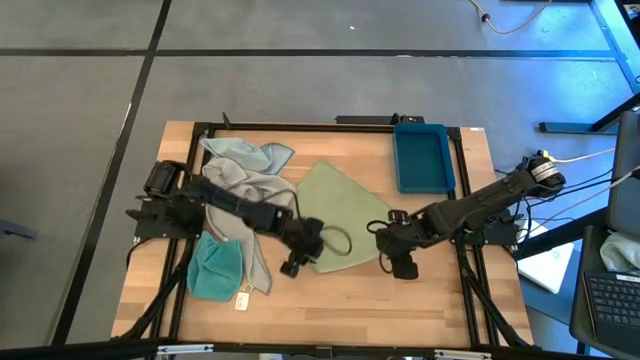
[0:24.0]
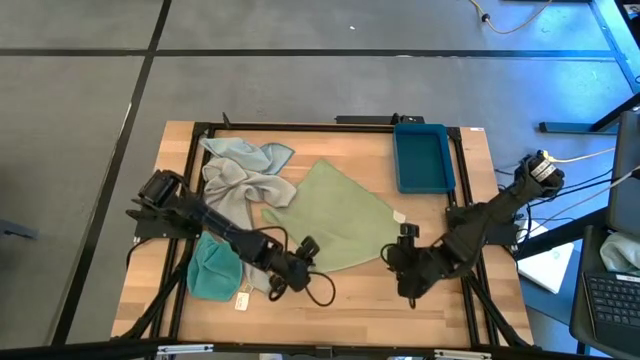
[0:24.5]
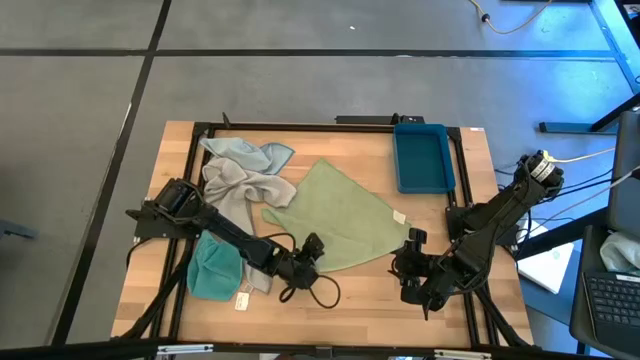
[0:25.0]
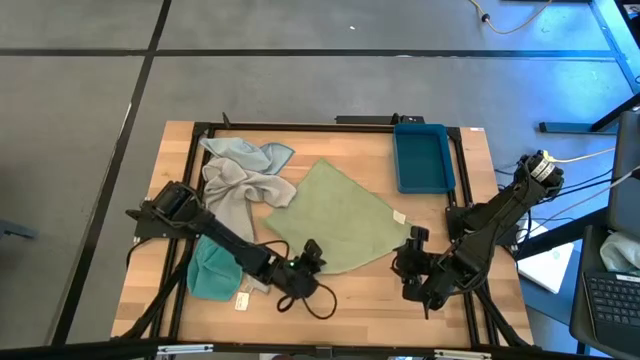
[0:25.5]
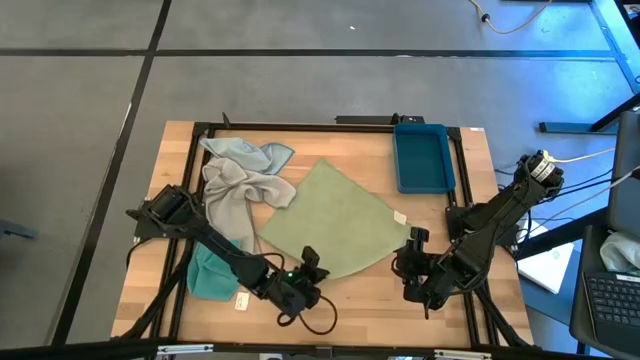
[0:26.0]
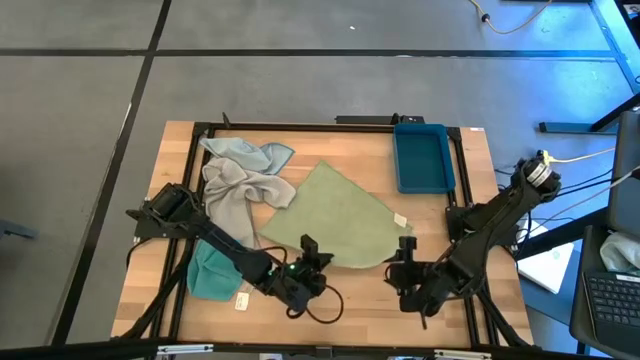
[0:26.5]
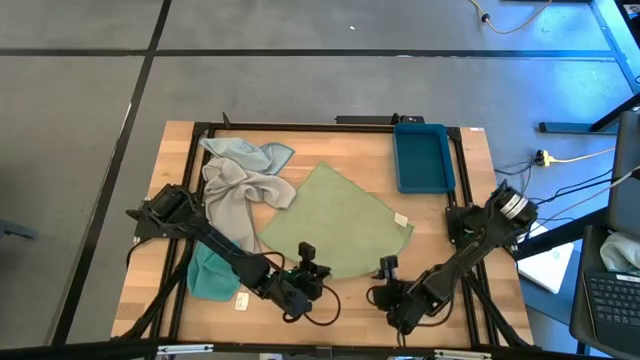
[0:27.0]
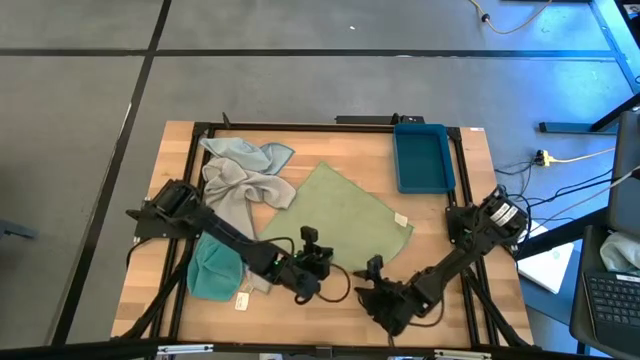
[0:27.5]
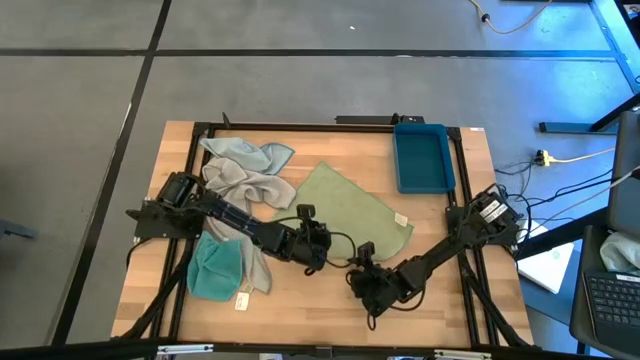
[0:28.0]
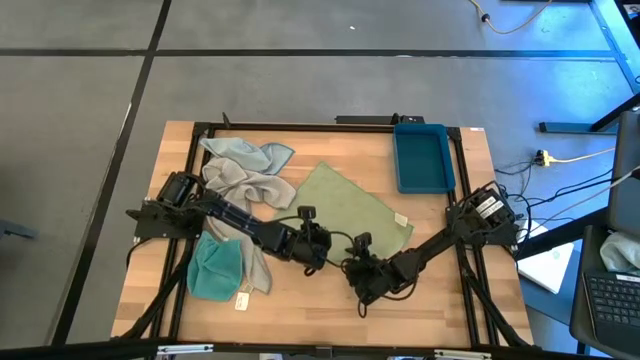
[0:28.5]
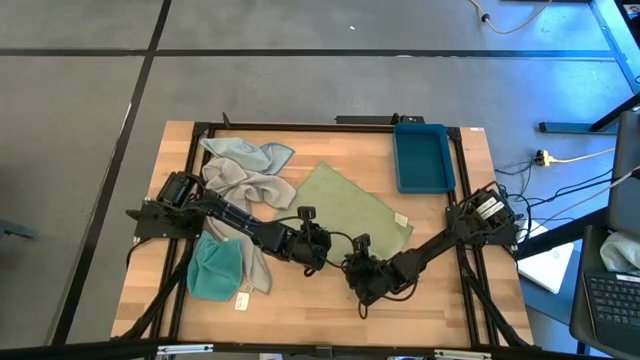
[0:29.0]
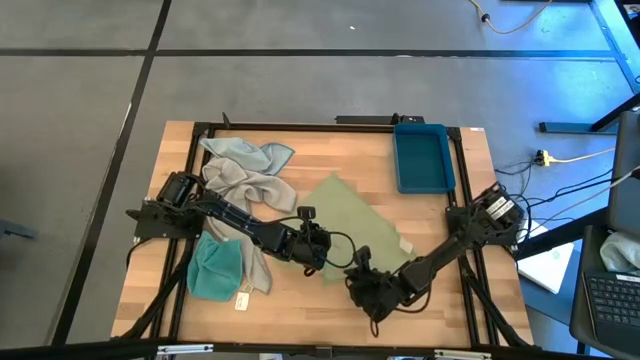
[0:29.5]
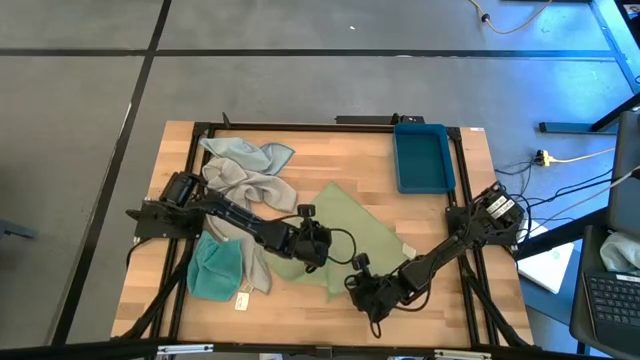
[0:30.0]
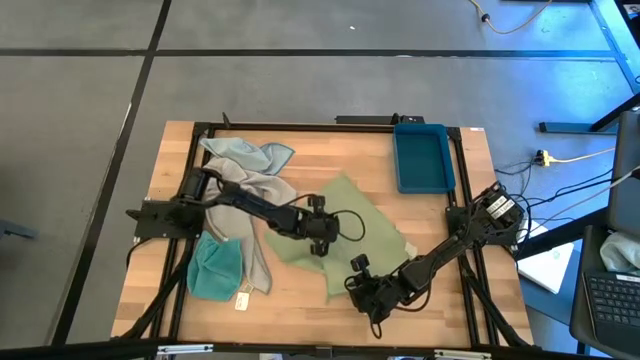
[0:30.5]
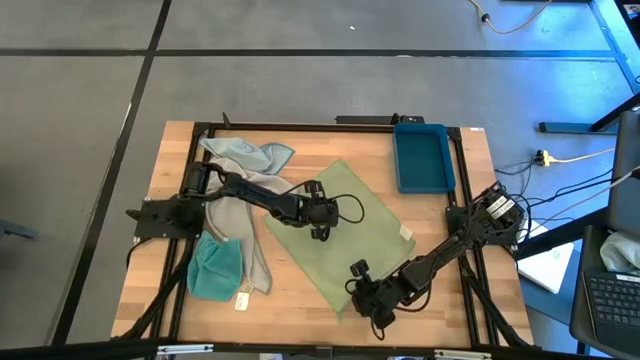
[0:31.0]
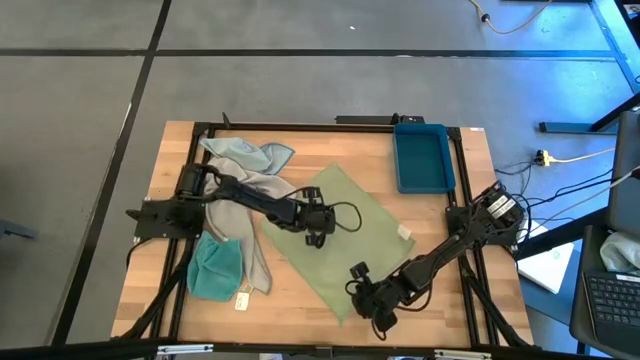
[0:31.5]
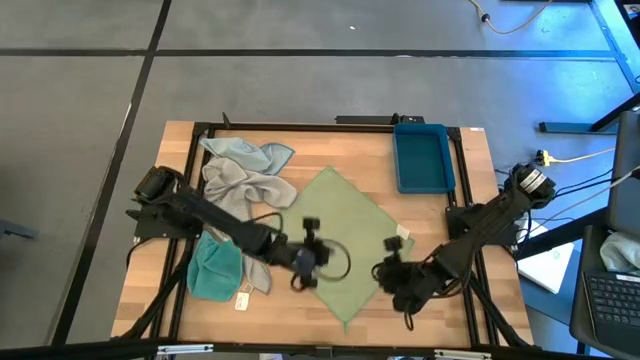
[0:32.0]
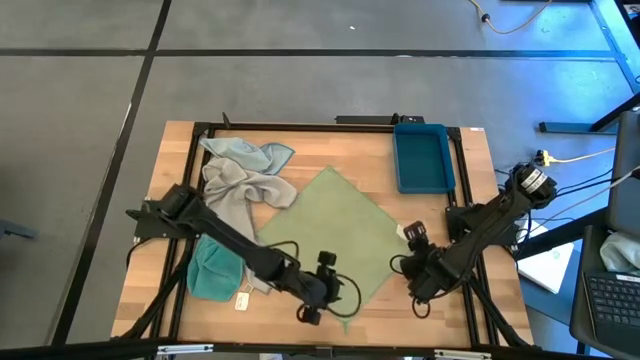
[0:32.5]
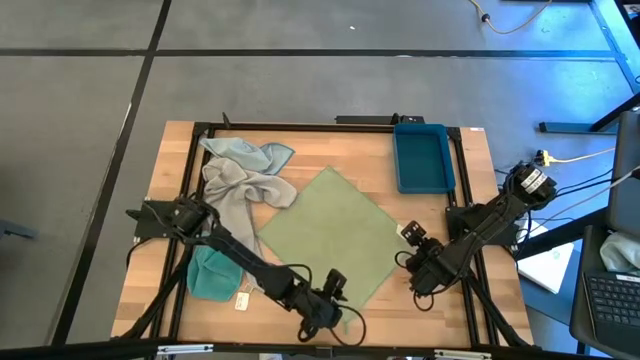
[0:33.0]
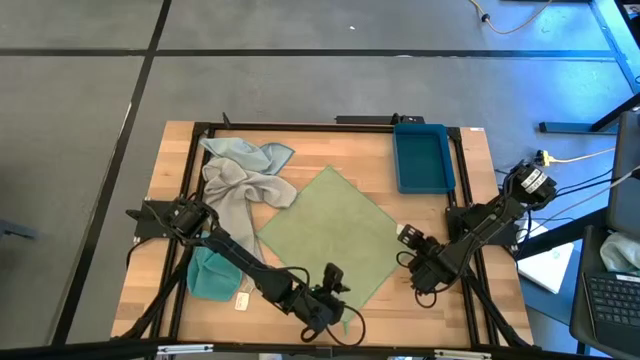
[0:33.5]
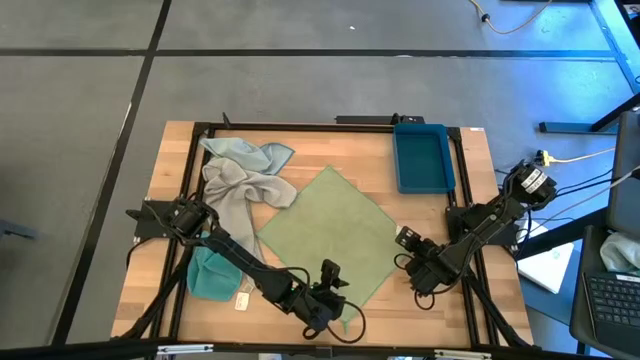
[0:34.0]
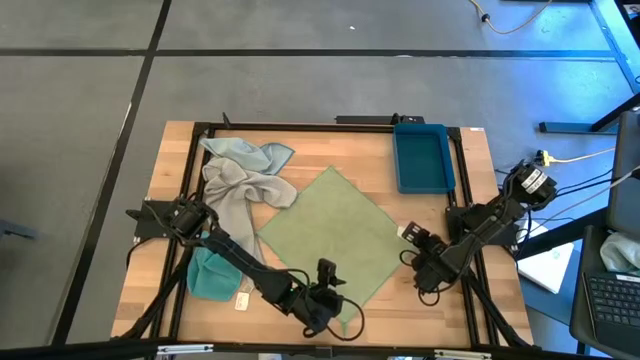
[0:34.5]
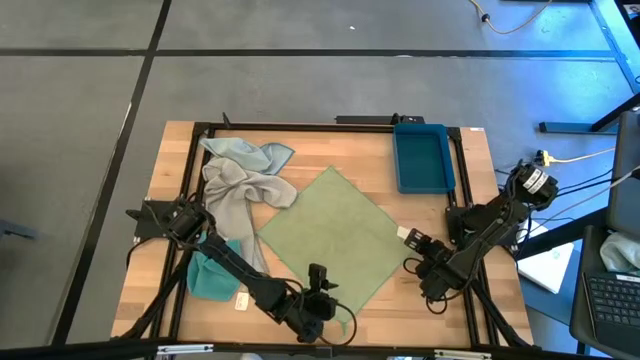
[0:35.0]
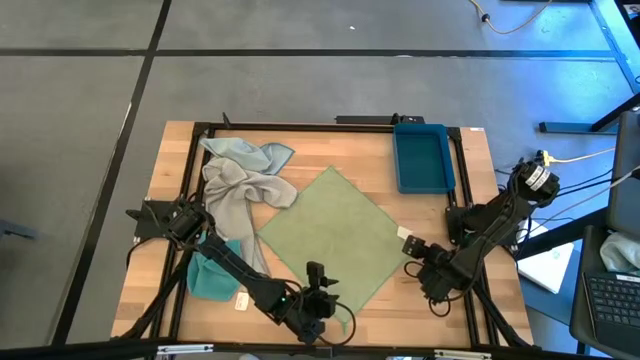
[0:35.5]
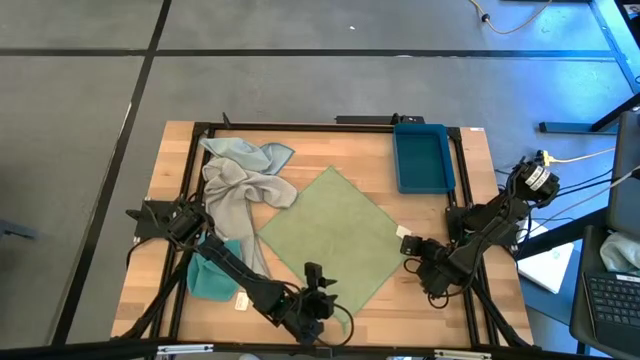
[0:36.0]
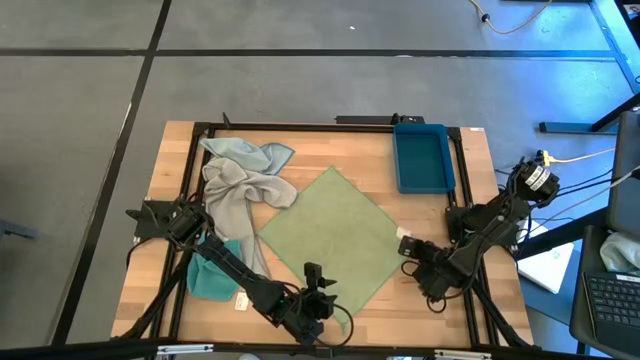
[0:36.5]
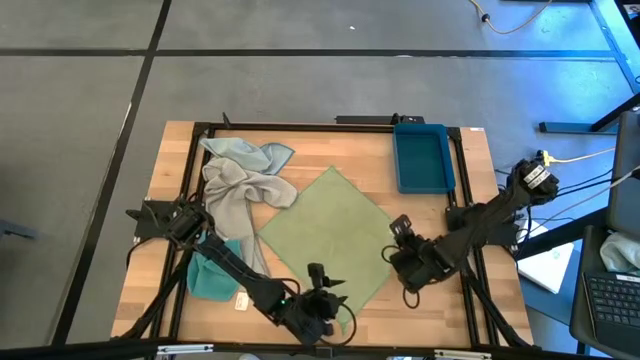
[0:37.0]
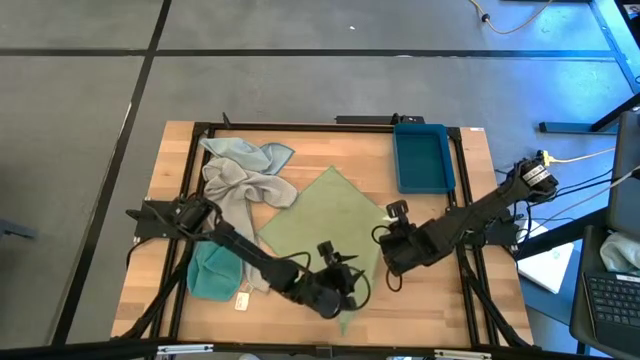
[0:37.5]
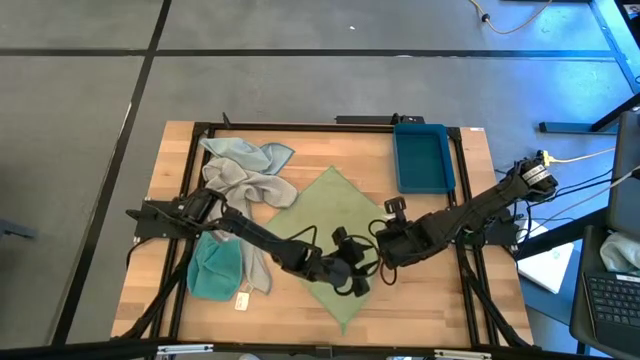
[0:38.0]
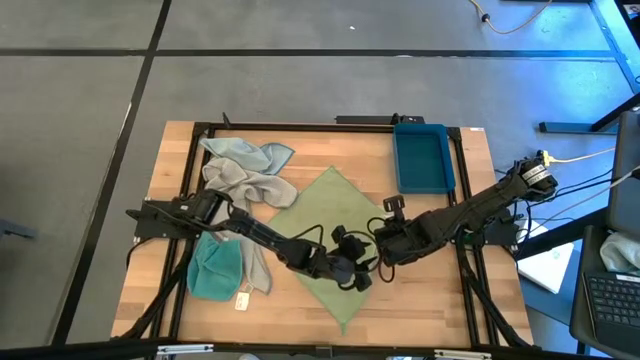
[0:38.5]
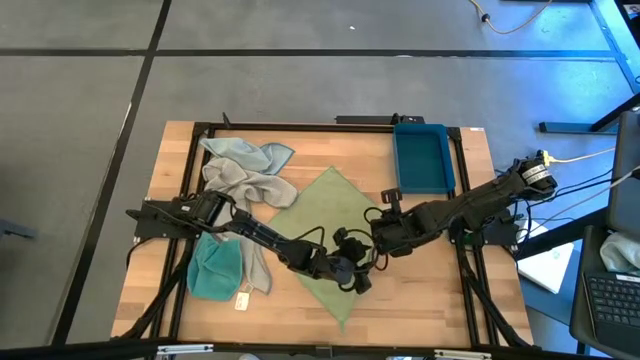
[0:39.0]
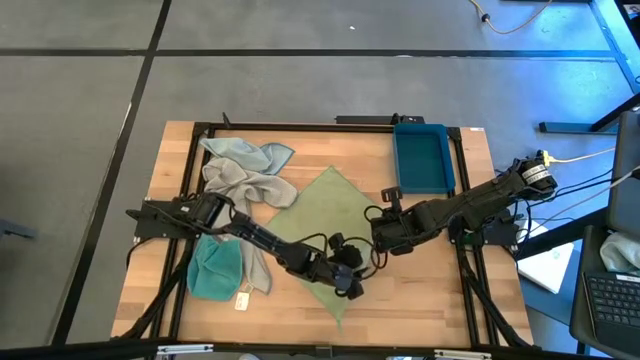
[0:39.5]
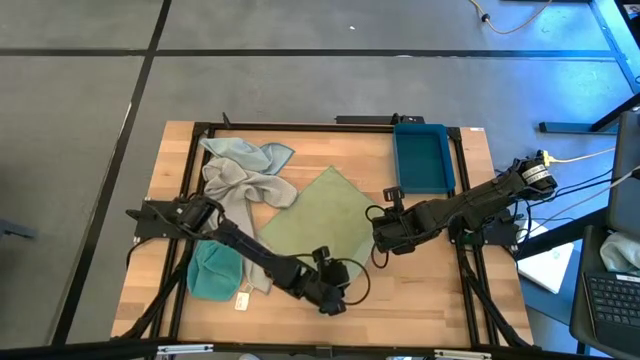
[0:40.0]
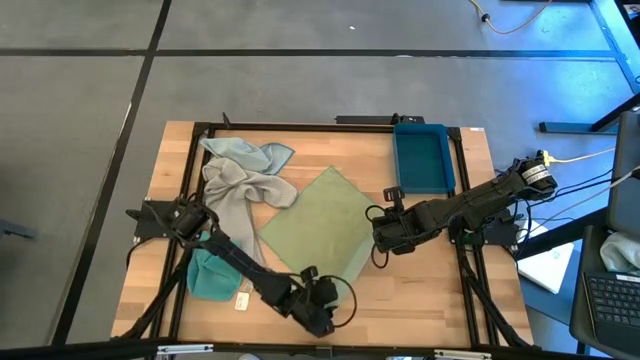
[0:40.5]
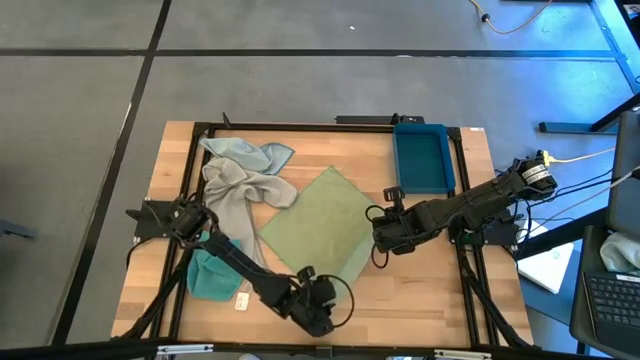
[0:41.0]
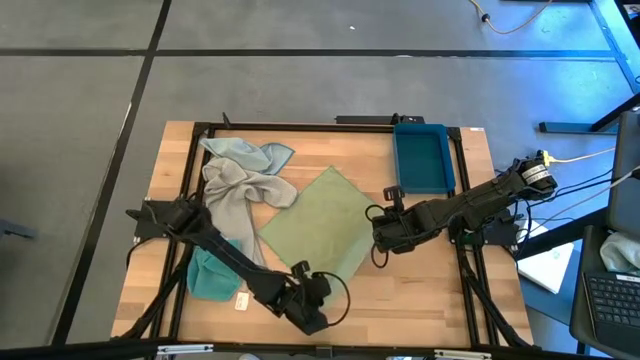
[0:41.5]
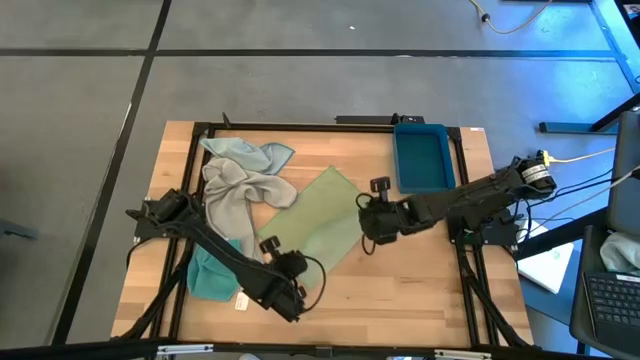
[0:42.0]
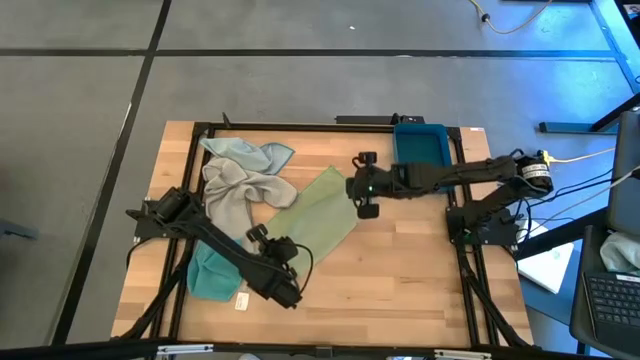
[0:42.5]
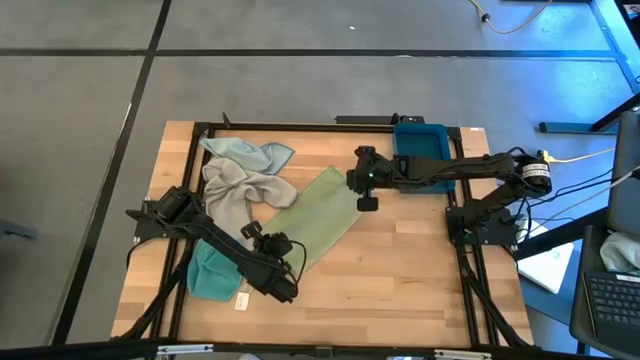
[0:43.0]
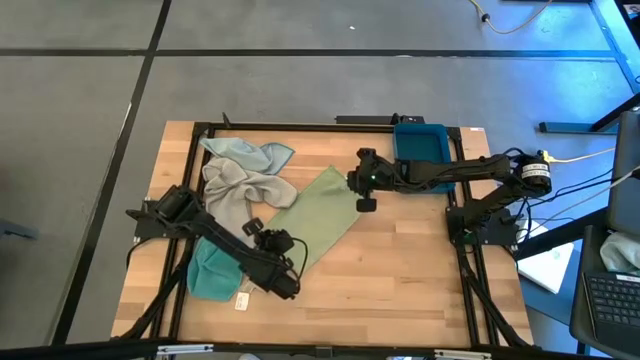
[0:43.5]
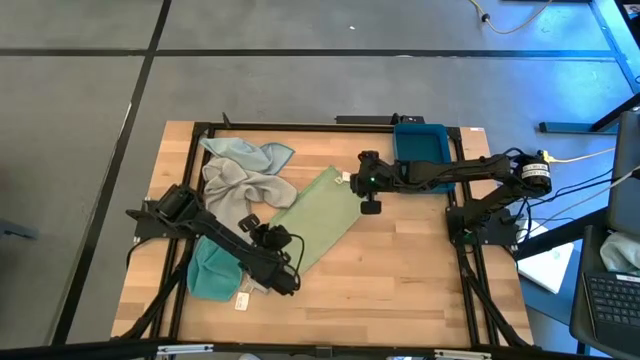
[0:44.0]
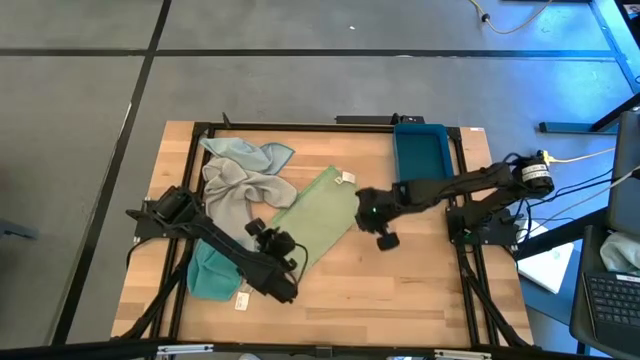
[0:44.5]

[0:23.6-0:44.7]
Task: Fold microfiber towels
Fold the green microfiber cloth
